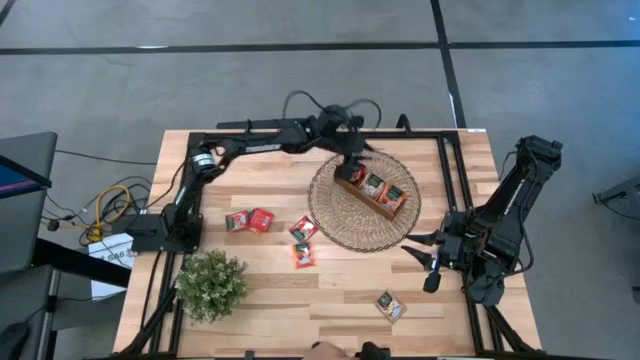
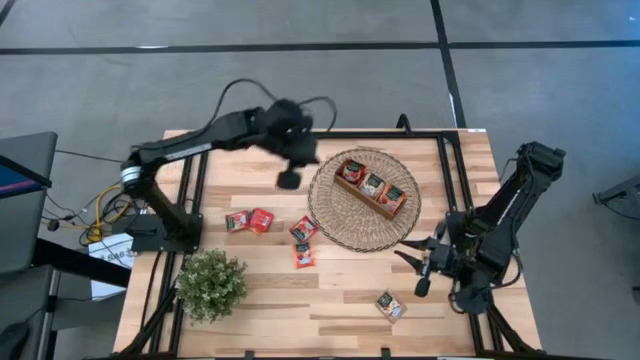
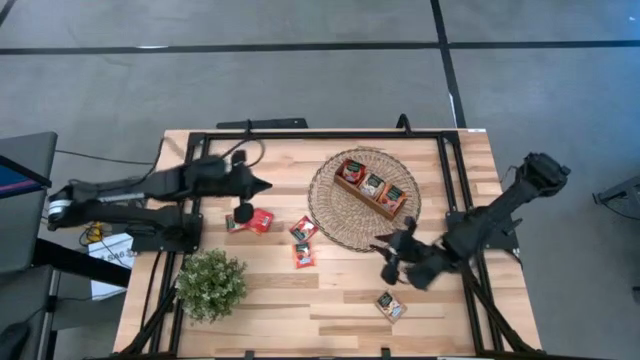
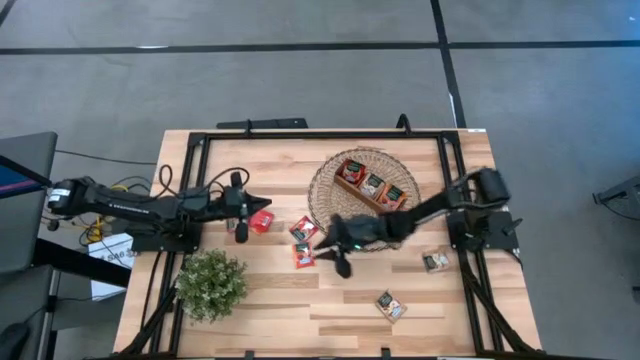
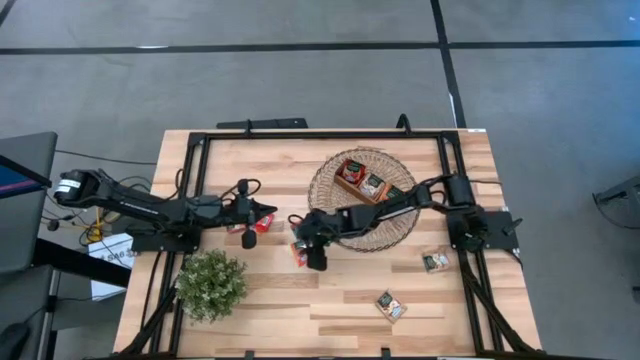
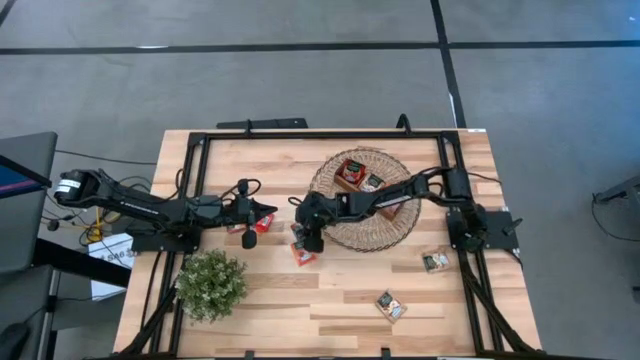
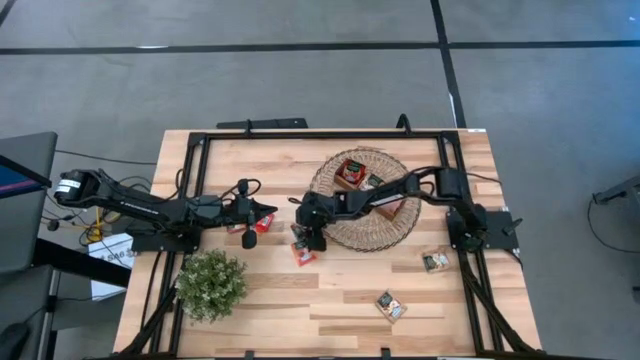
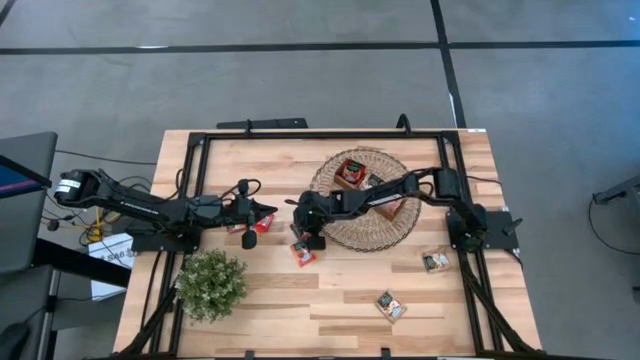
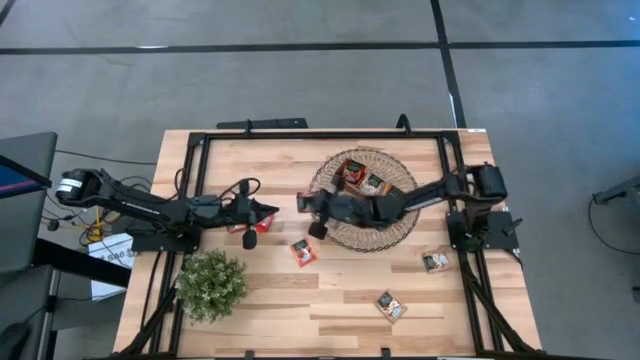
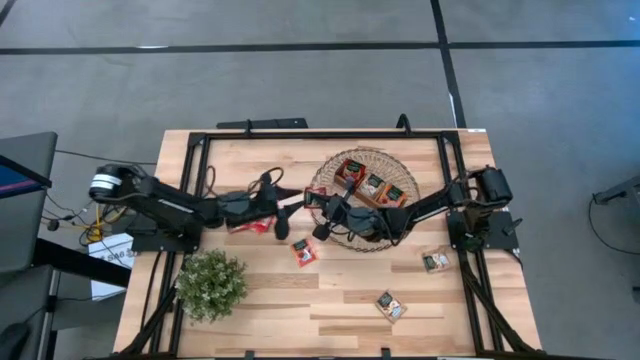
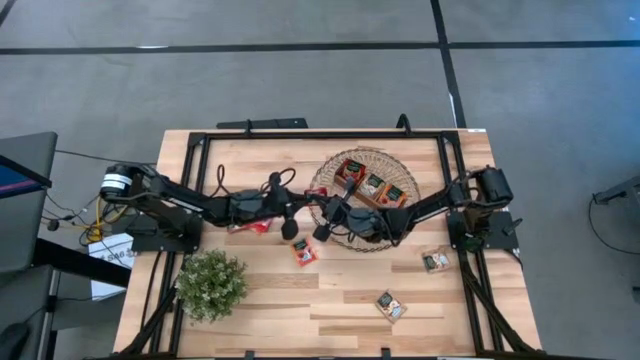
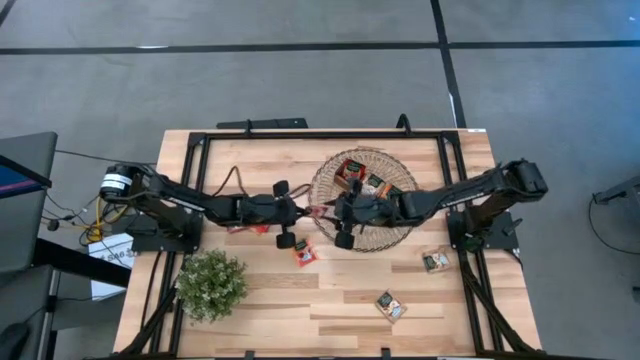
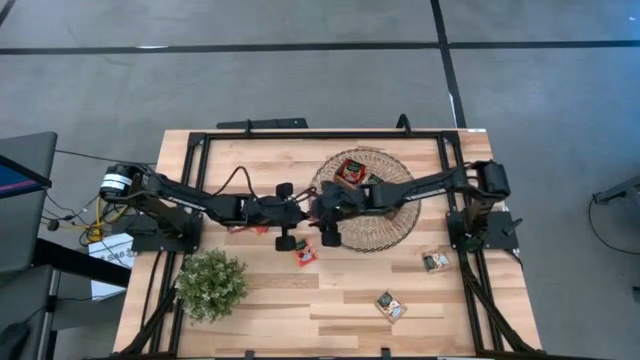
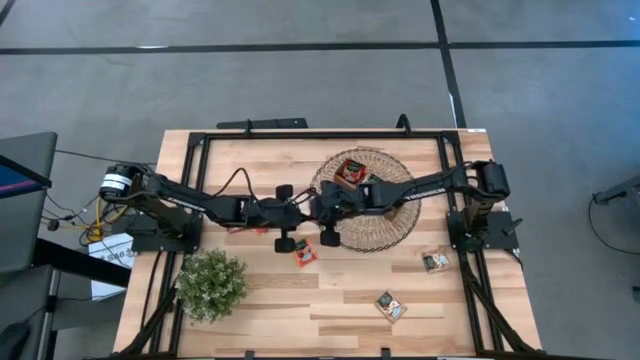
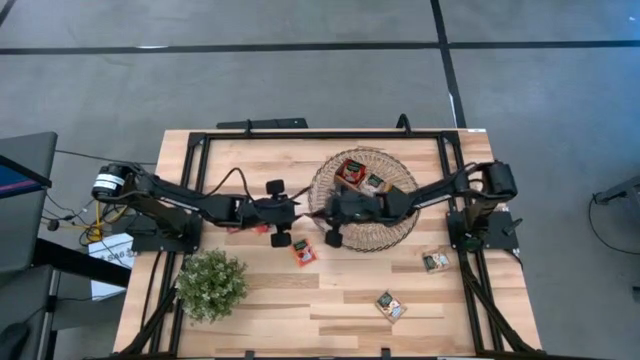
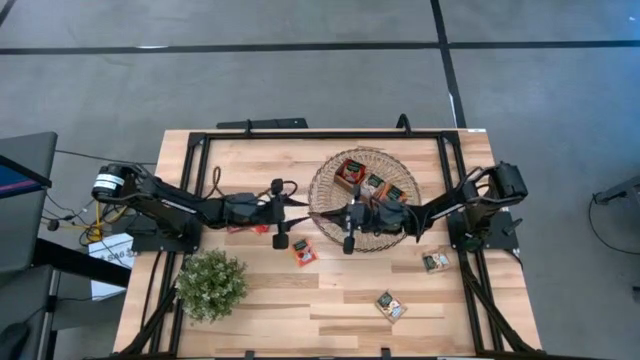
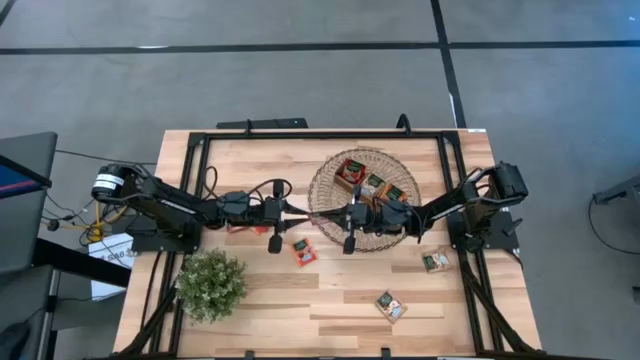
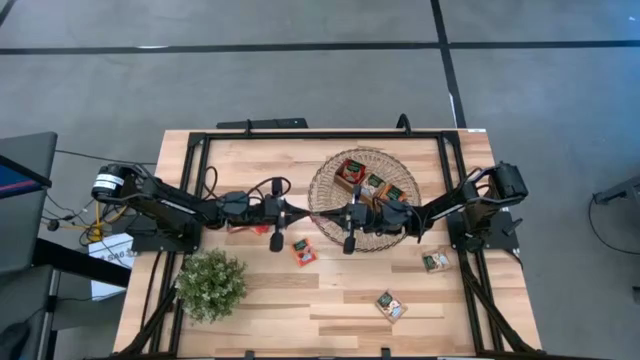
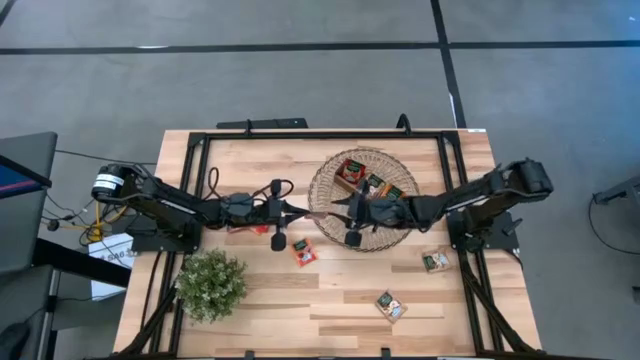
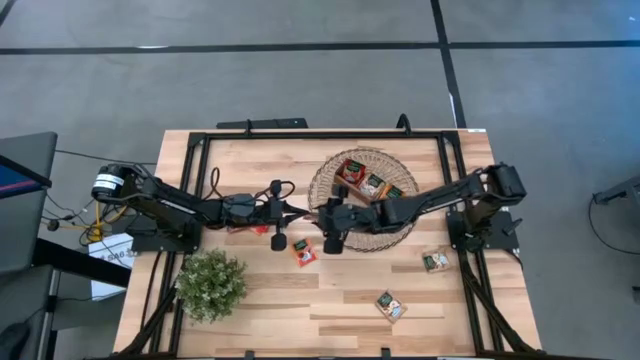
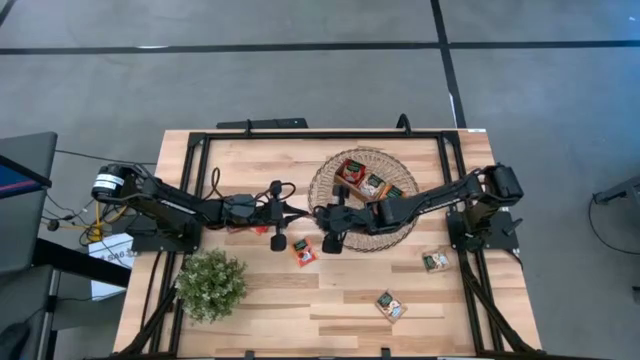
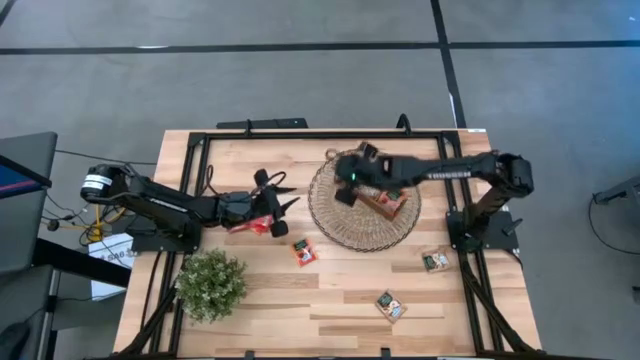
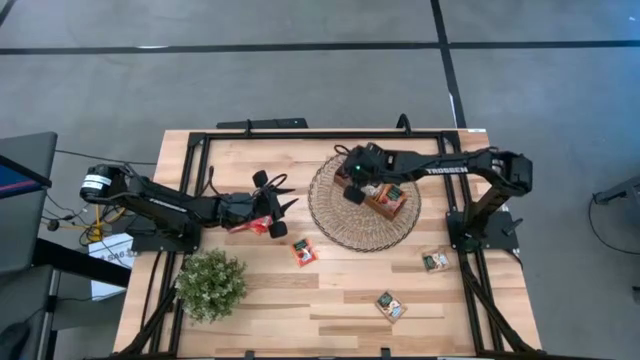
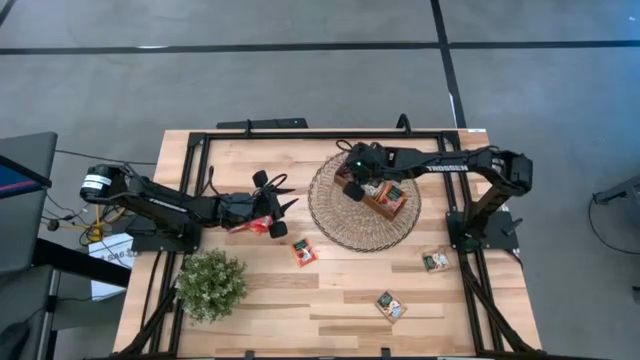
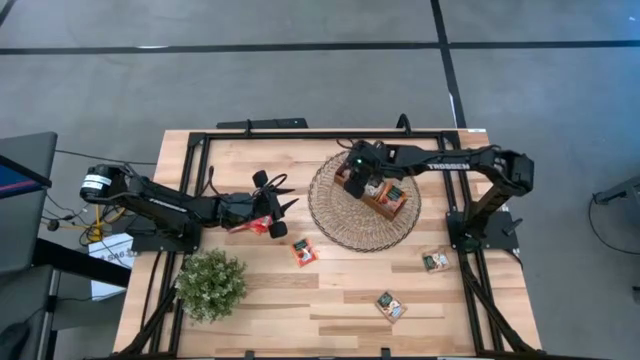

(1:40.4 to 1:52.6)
Task: Pick & Place Tea
Put the red tea bag into the left section of the wooden organizer

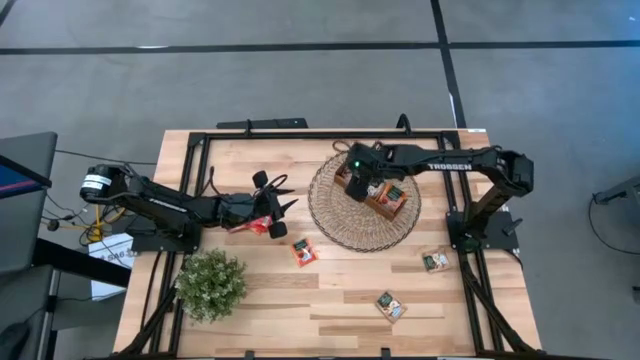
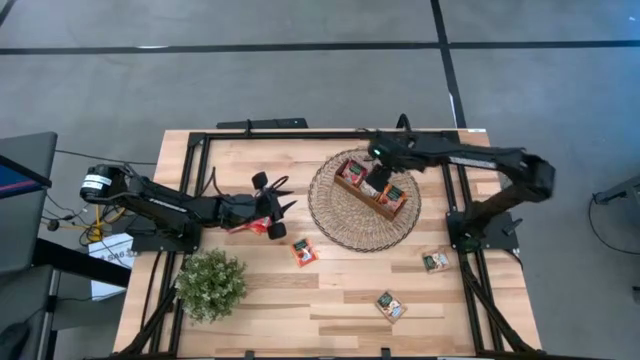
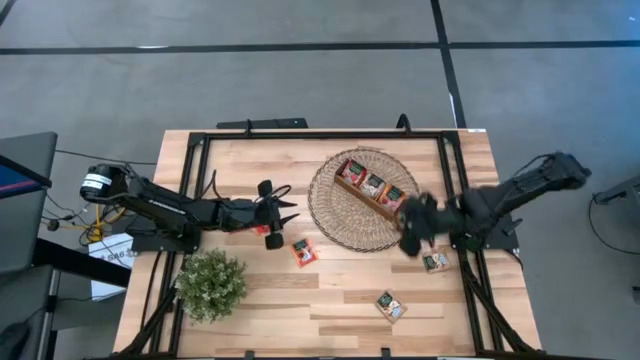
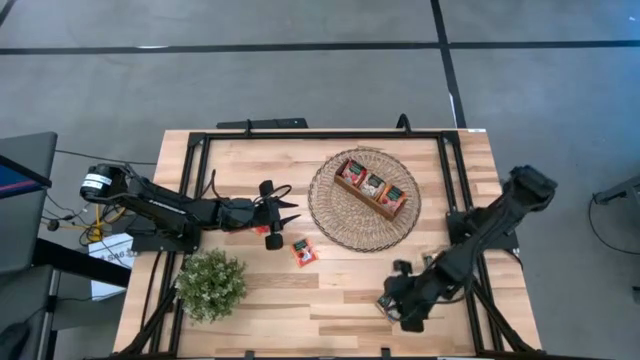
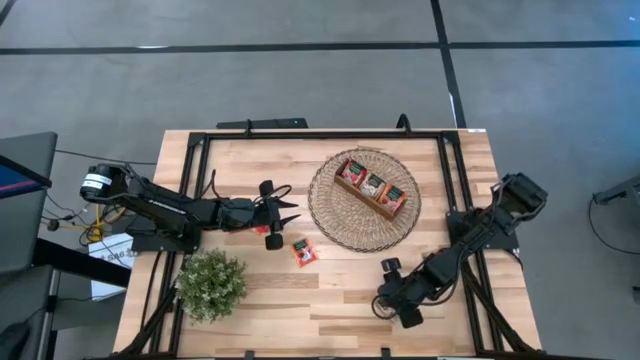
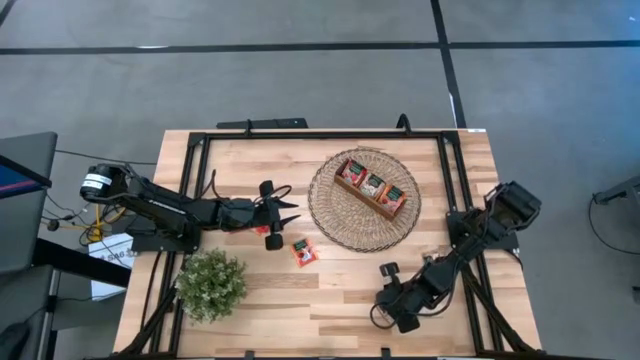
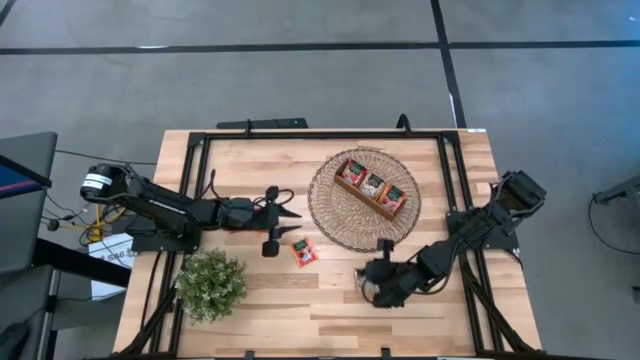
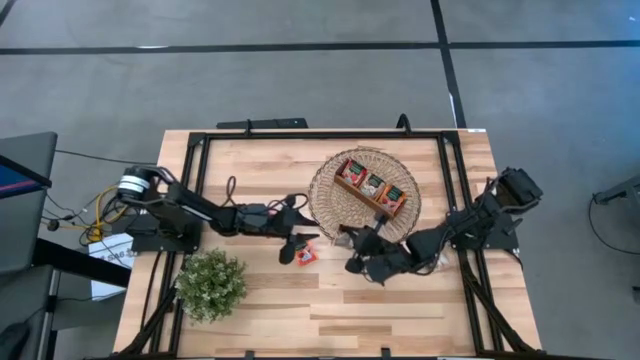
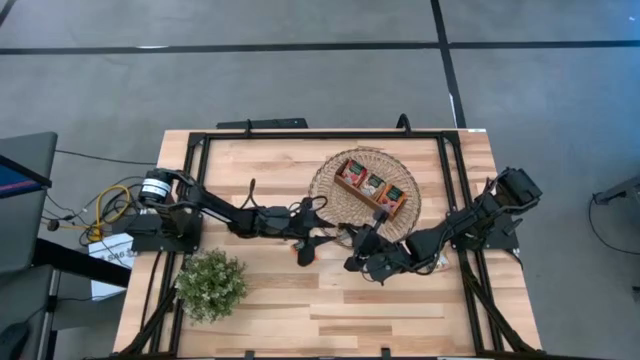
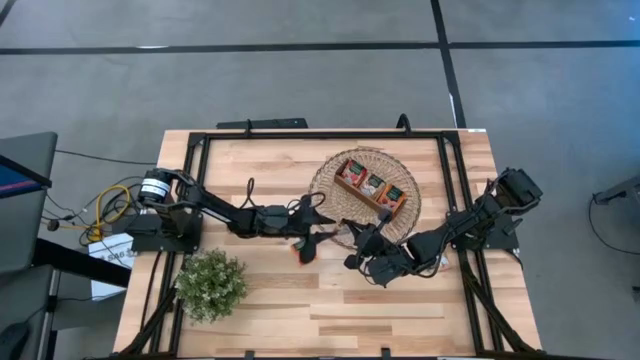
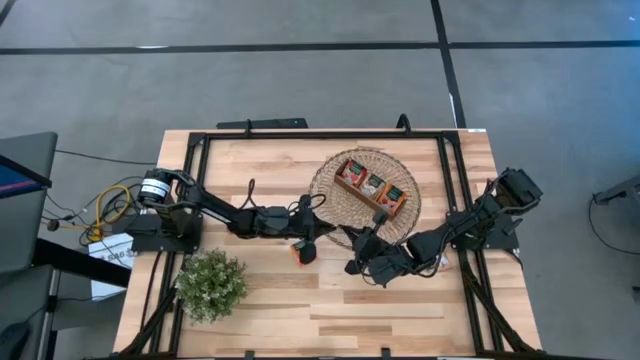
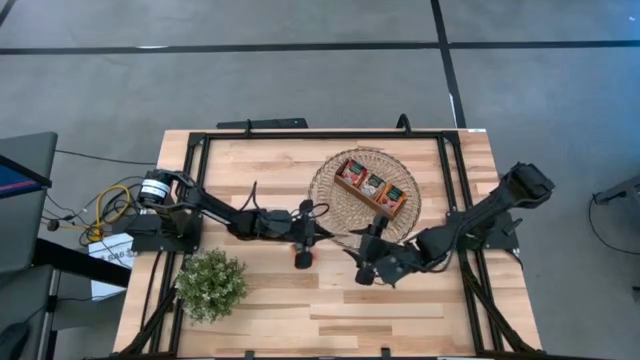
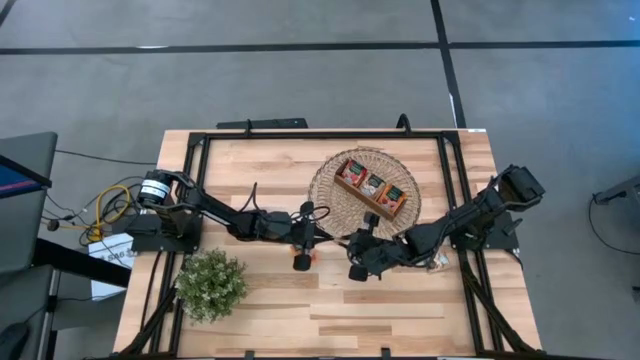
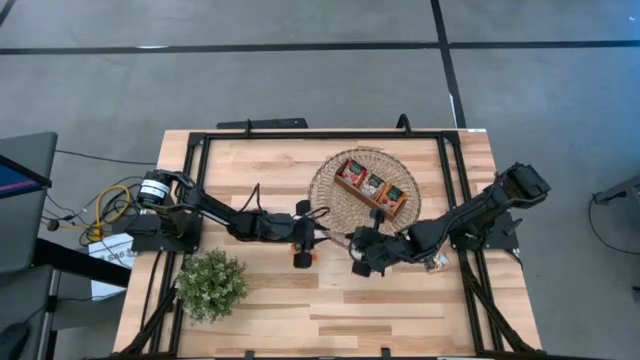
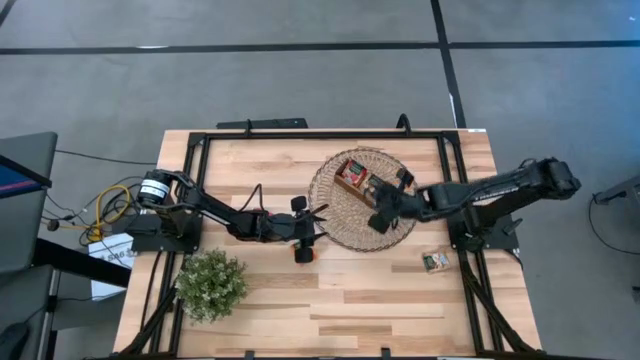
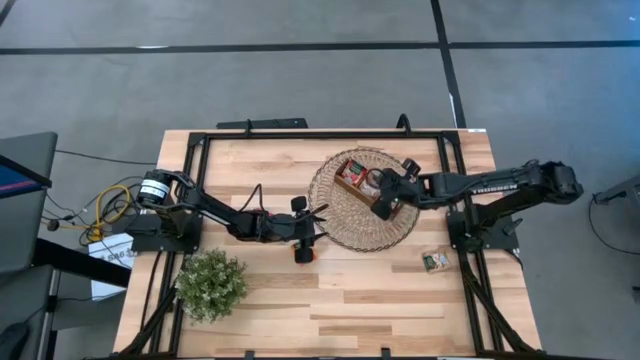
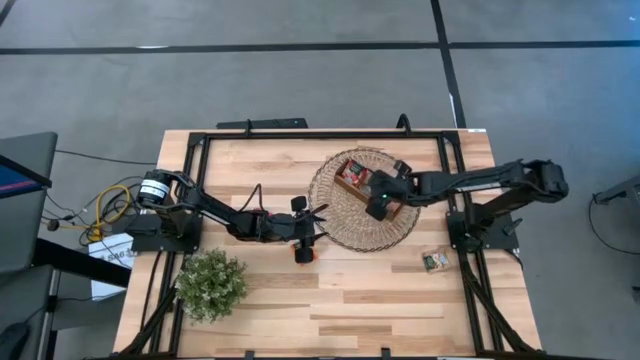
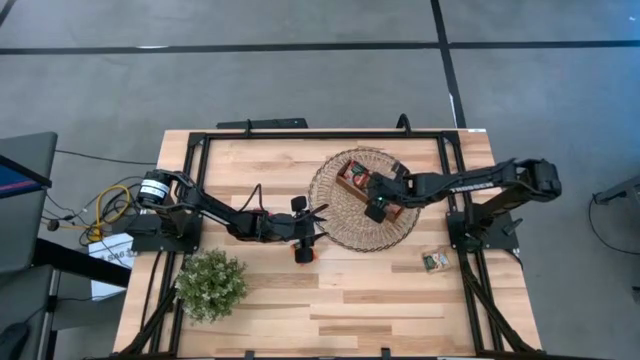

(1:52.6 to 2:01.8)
Put the brown tea bag into the middle section of the wooden organizer
